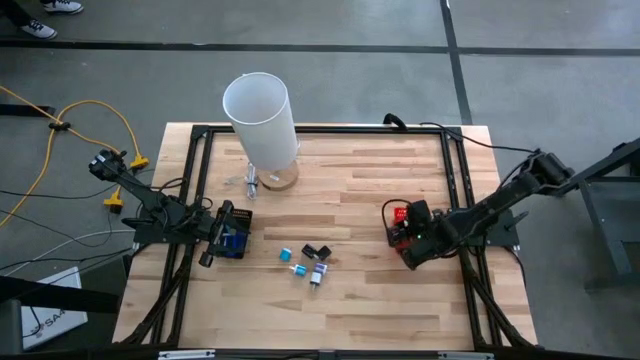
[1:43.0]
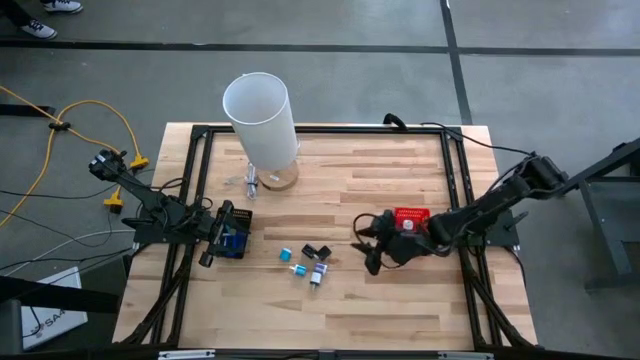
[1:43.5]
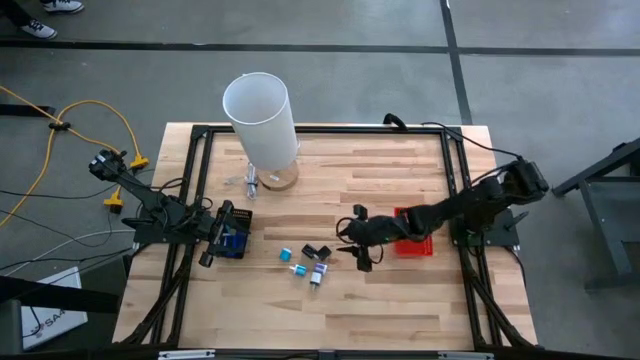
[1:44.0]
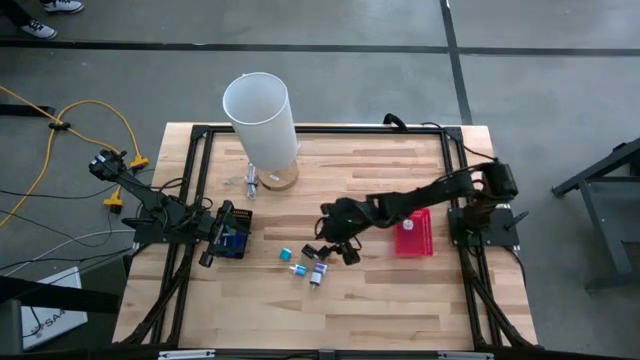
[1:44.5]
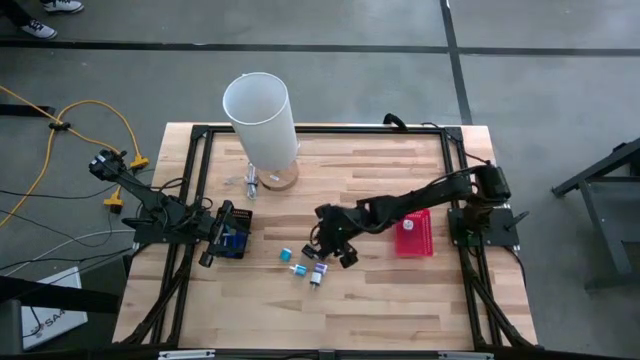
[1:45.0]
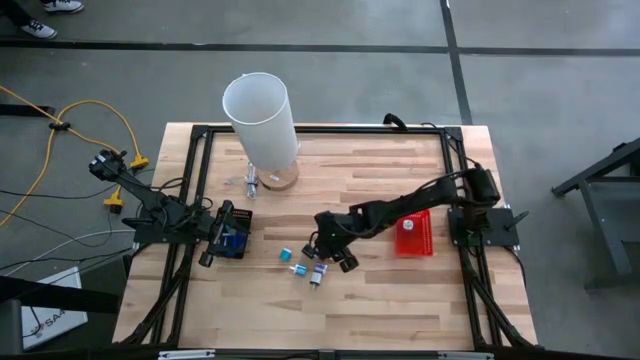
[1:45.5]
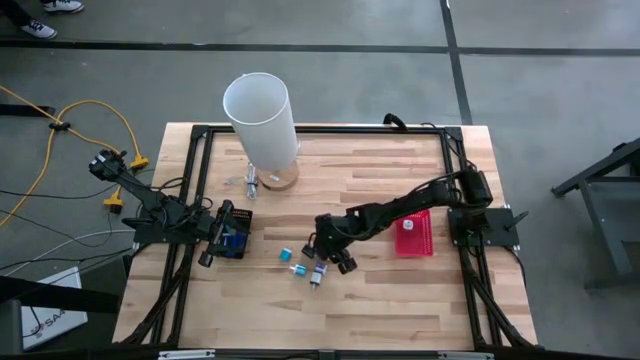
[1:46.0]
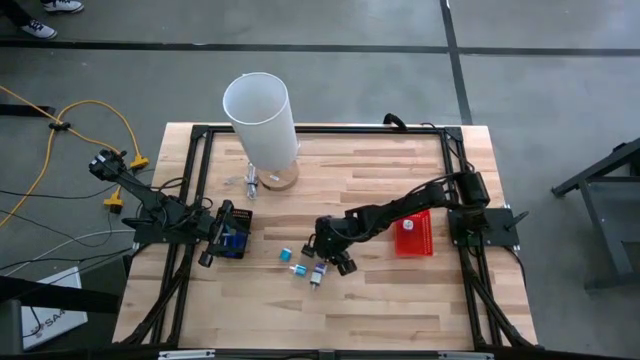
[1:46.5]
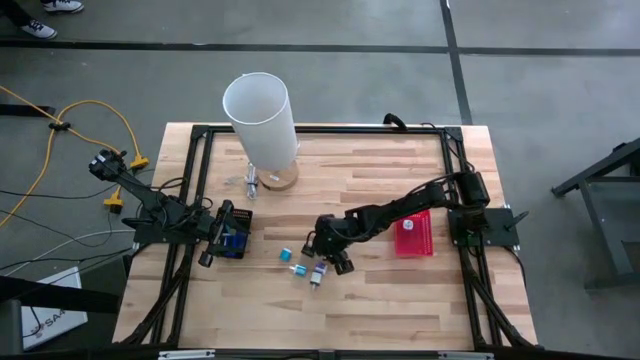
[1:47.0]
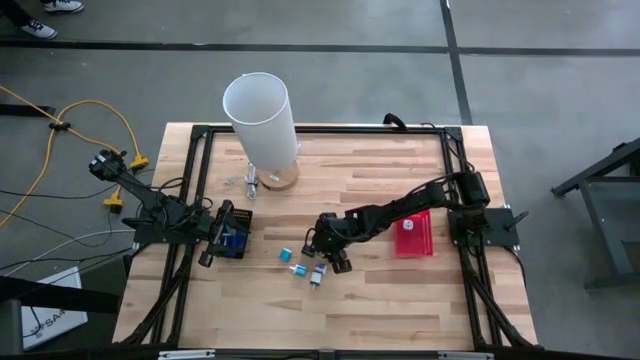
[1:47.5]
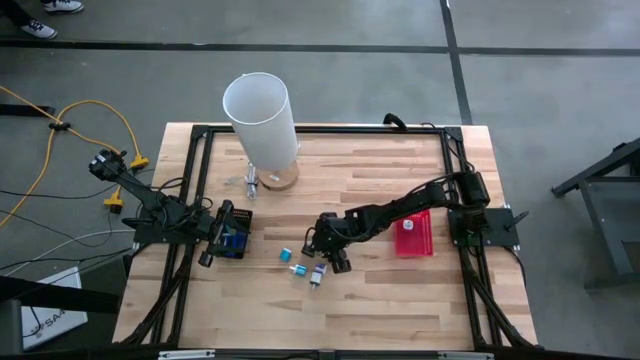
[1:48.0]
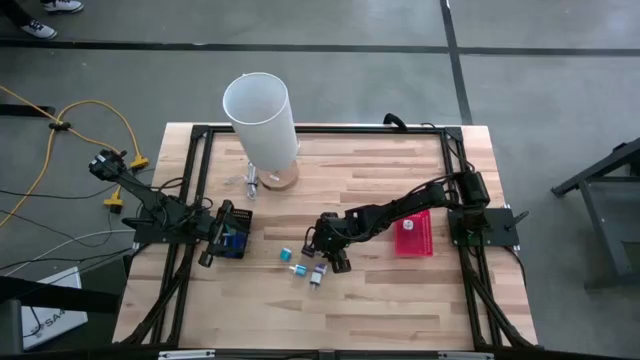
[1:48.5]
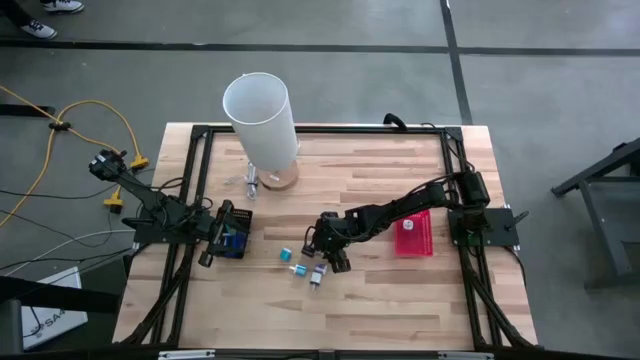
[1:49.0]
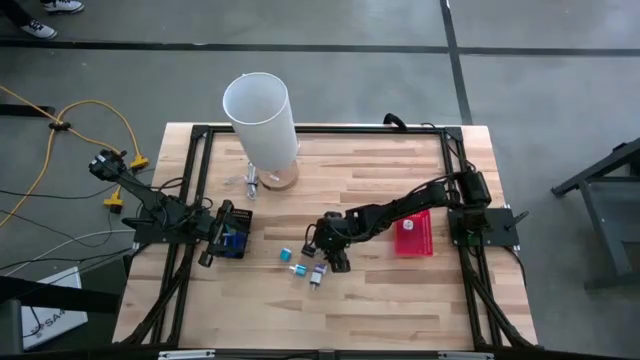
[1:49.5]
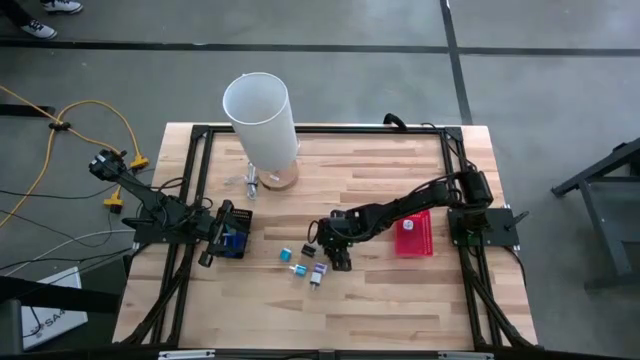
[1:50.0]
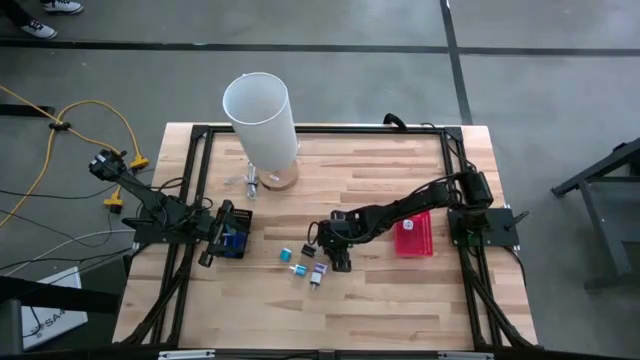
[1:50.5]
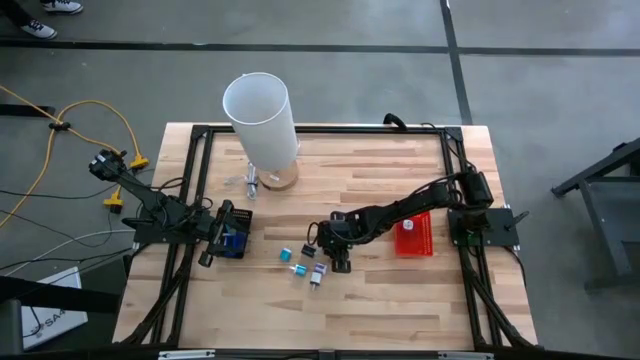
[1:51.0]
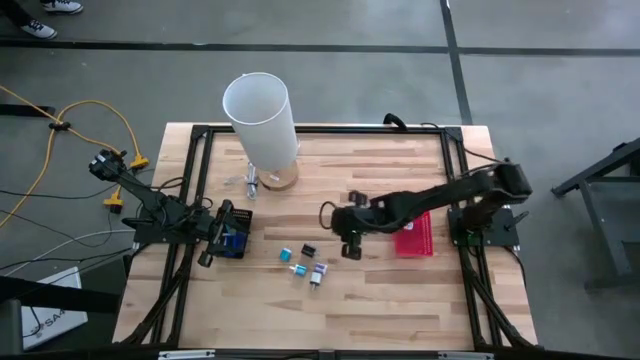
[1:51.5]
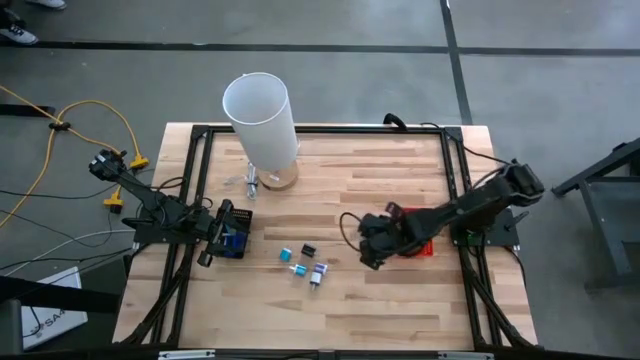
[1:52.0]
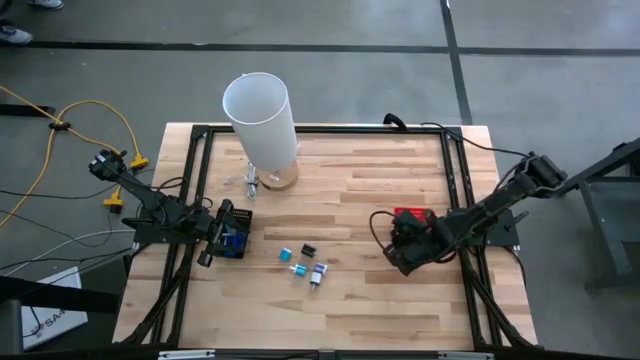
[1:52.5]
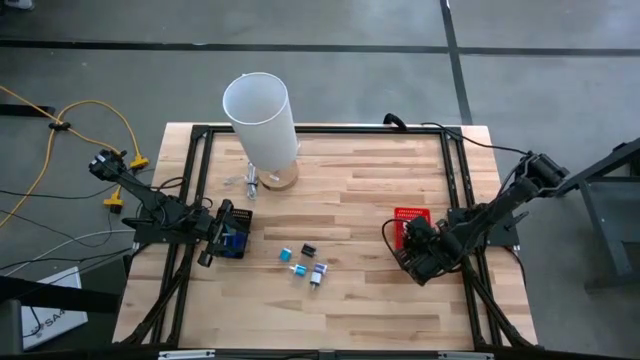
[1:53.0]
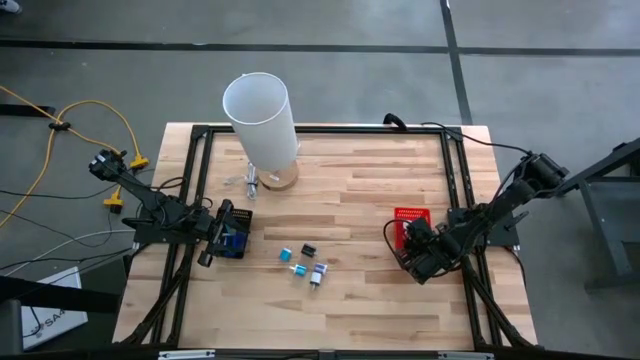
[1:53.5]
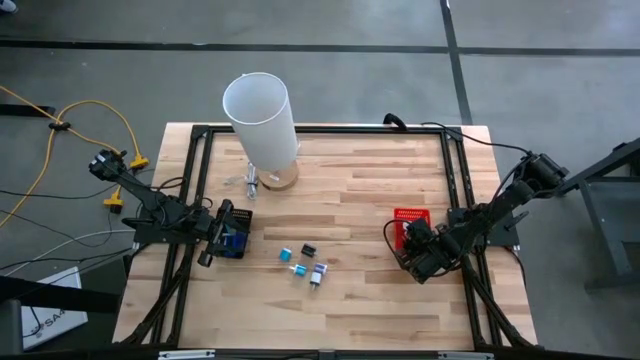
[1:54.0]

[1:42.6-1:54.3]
Task: Pick & Place Office items
Put the right black charger adapter into the red bin

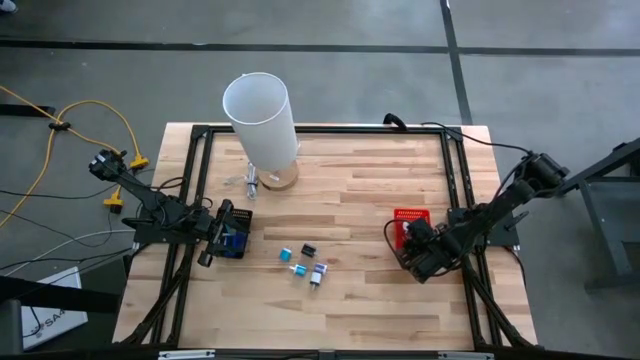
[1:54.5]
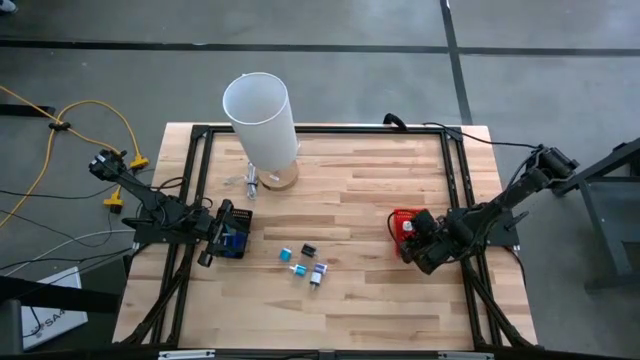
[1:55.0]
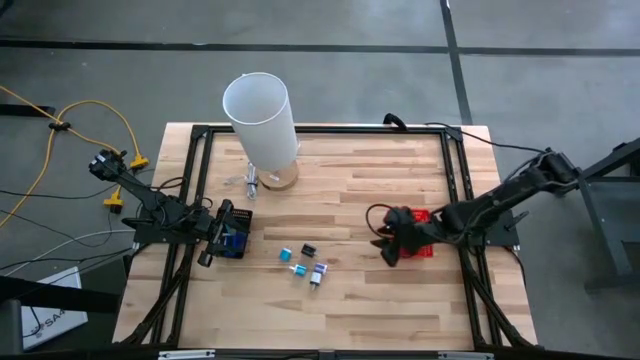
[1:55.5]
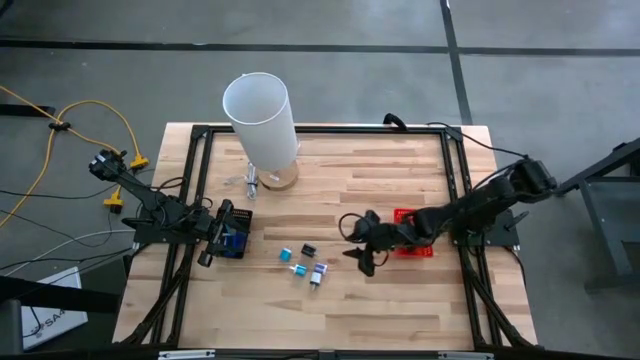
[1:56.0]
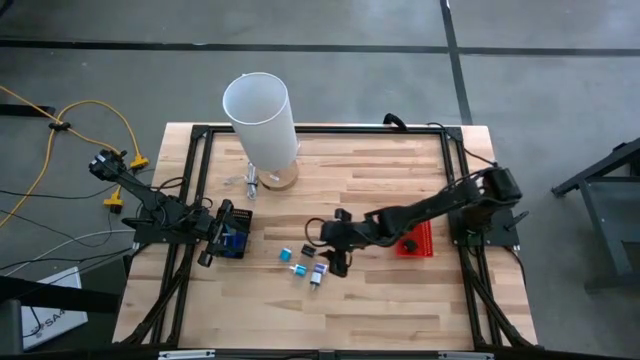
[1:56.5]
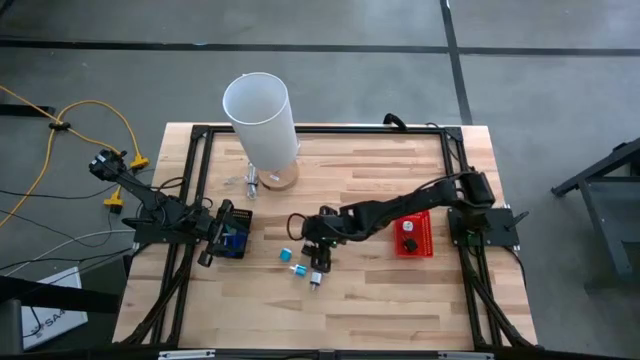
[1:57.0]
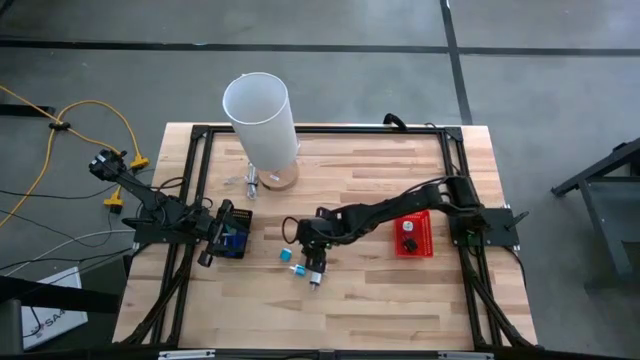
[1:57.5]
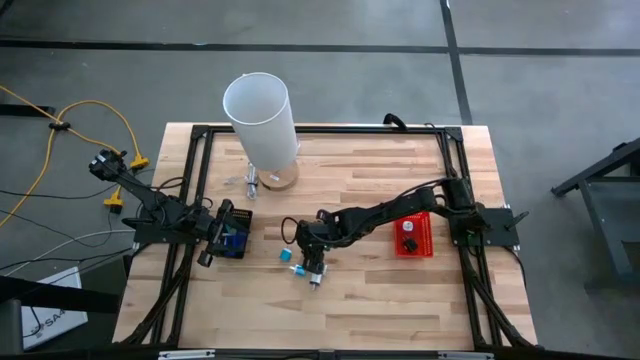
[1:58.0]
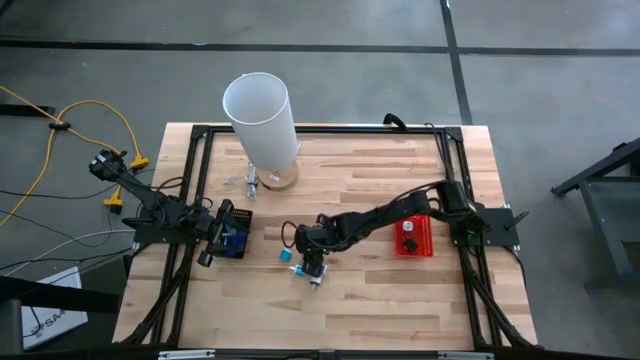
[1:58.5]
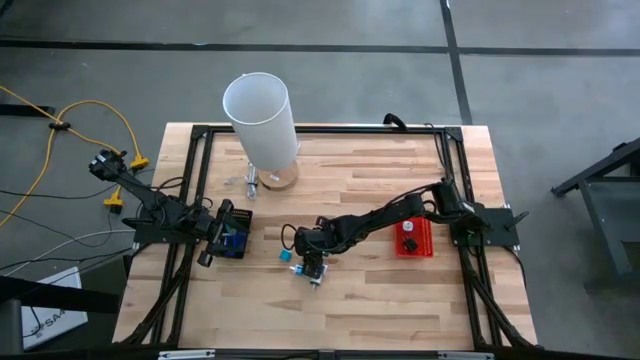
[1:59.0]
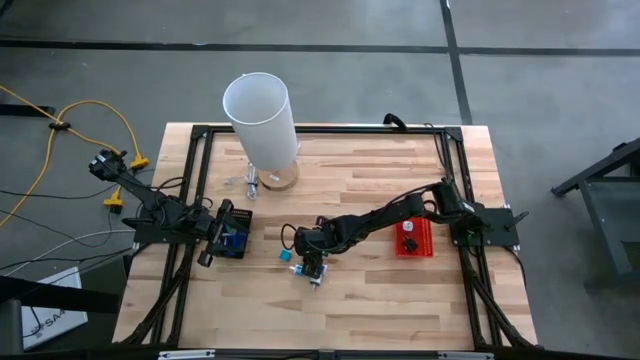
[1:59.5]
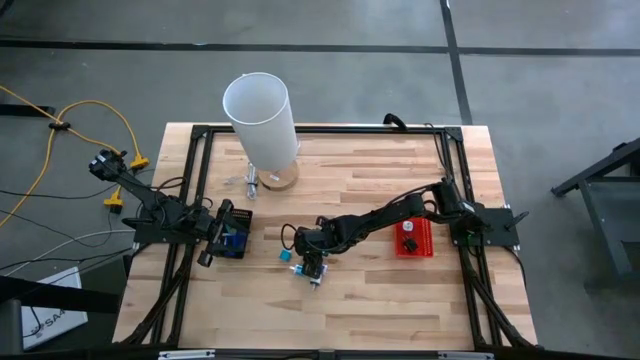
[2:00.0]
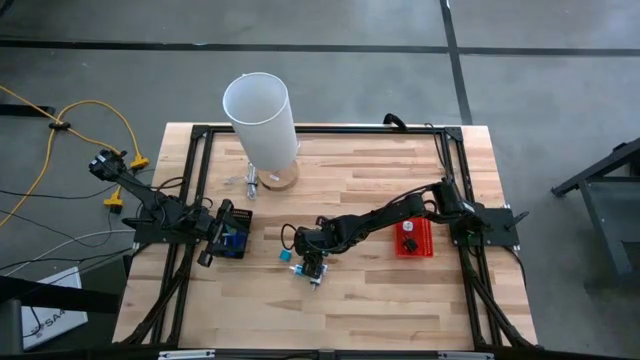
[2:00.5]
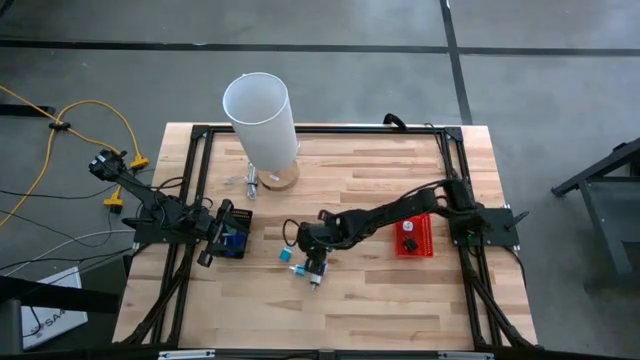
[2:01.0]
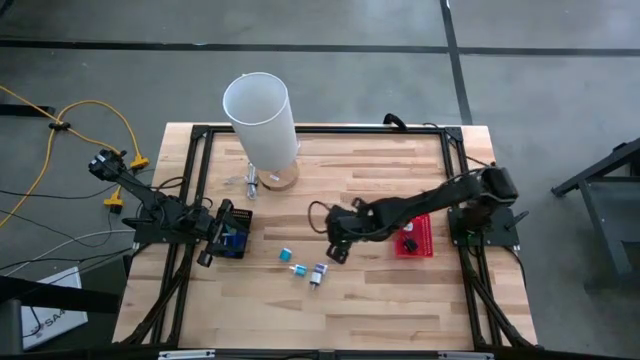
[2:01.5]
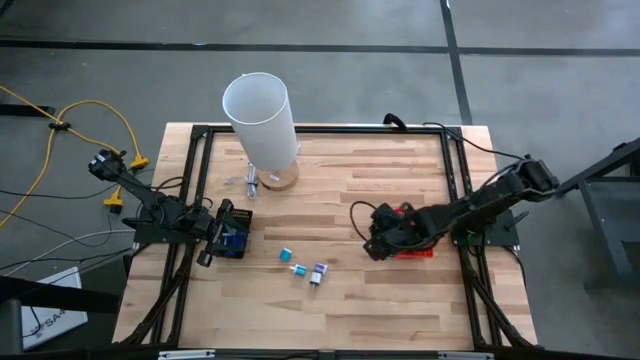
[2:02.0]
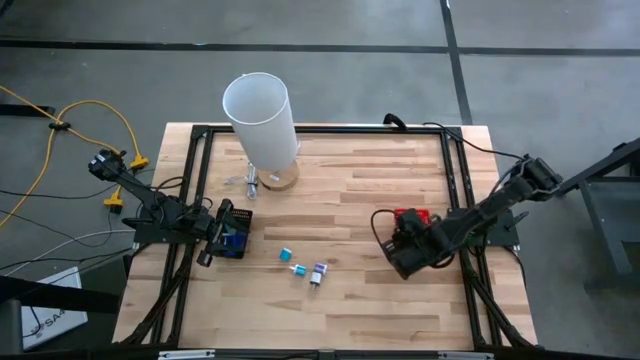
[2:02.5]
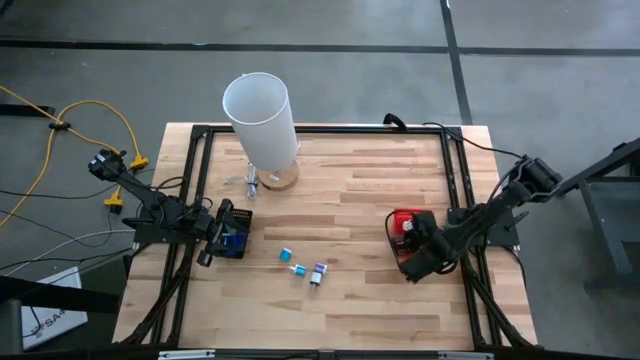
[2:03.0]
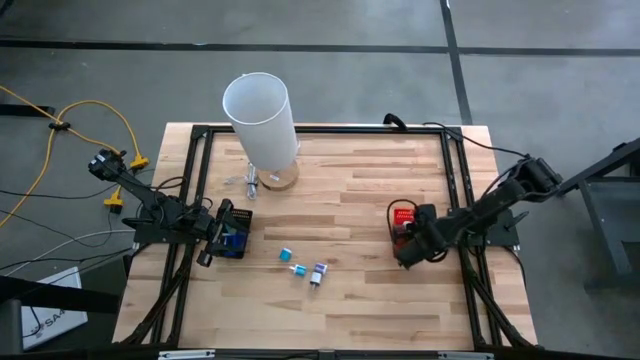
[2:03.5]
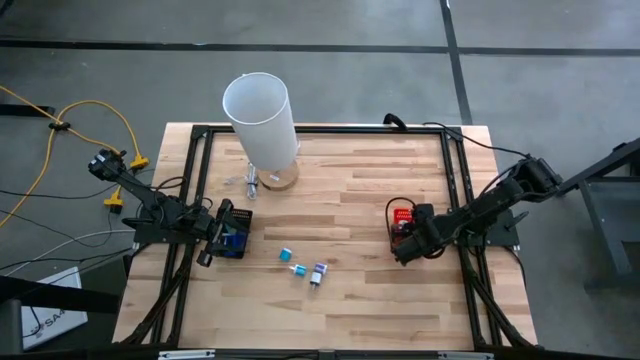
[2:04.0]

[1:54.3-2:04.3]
Put the black charger adapter into the red bin
